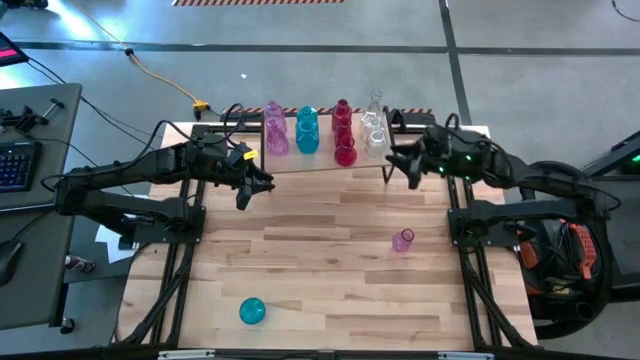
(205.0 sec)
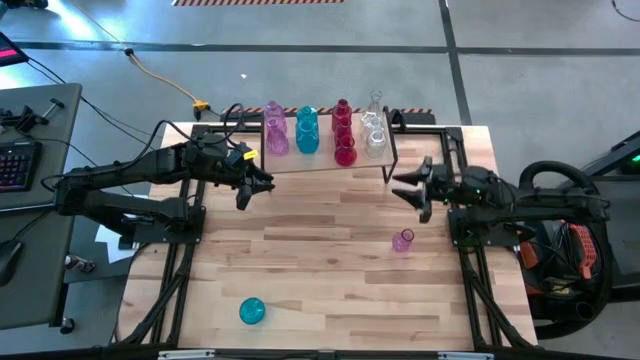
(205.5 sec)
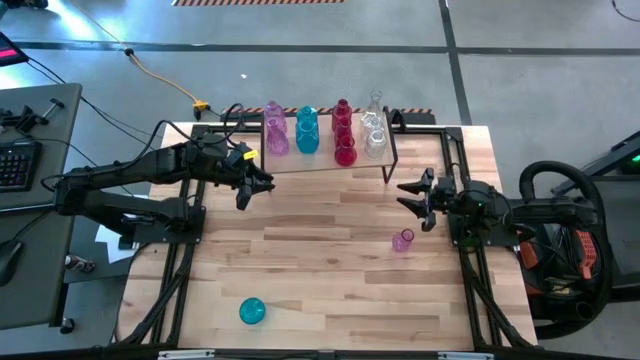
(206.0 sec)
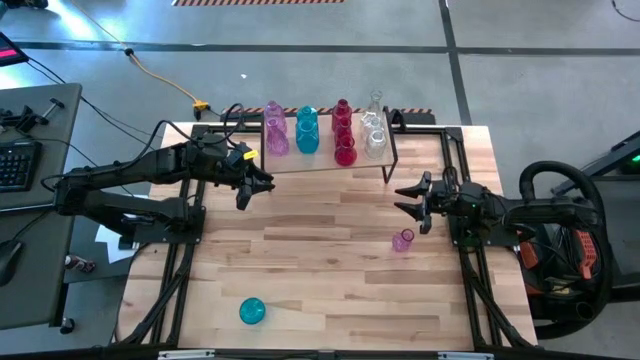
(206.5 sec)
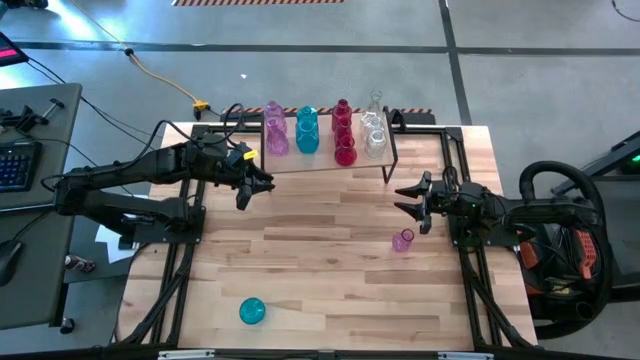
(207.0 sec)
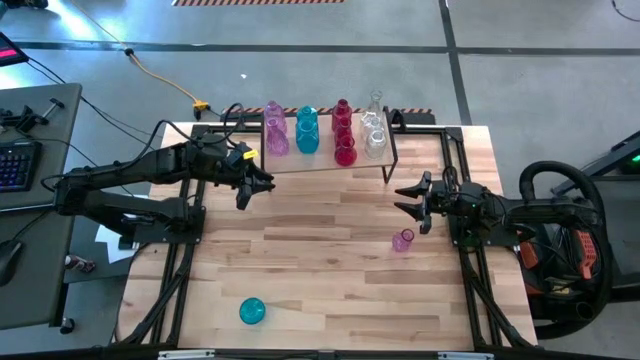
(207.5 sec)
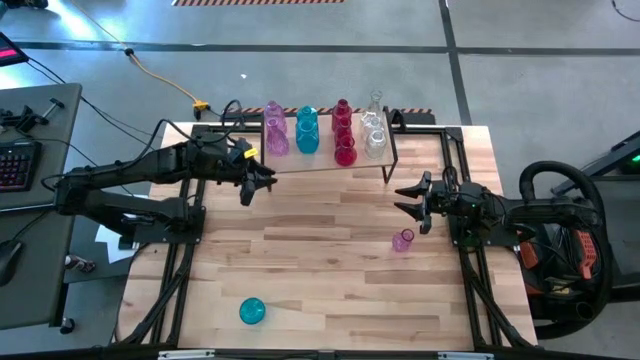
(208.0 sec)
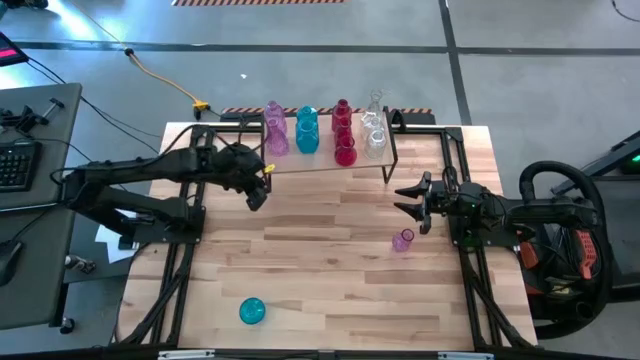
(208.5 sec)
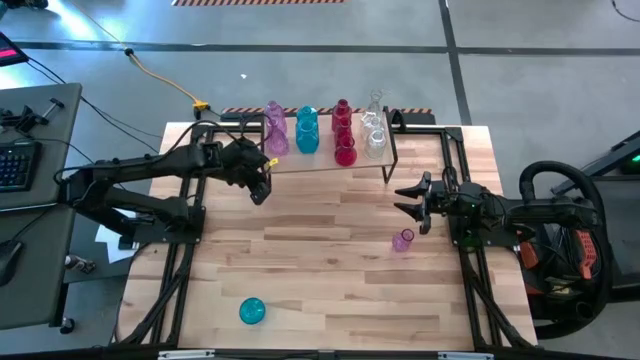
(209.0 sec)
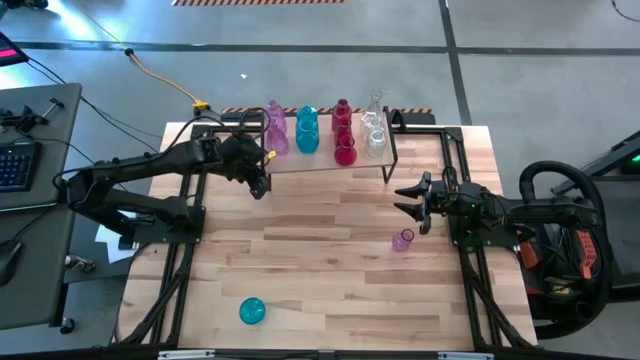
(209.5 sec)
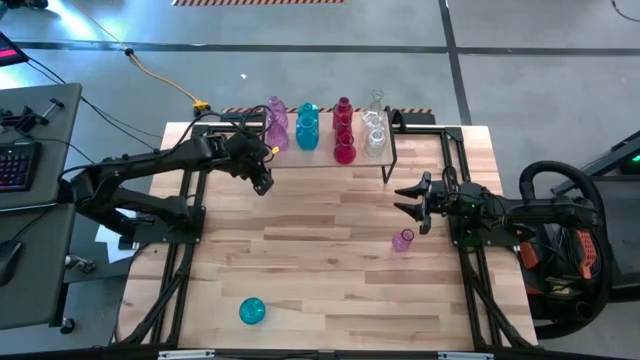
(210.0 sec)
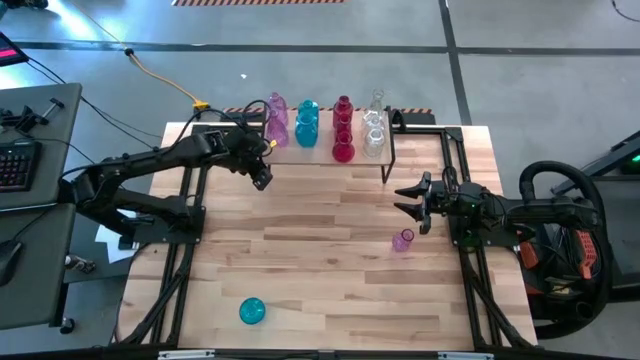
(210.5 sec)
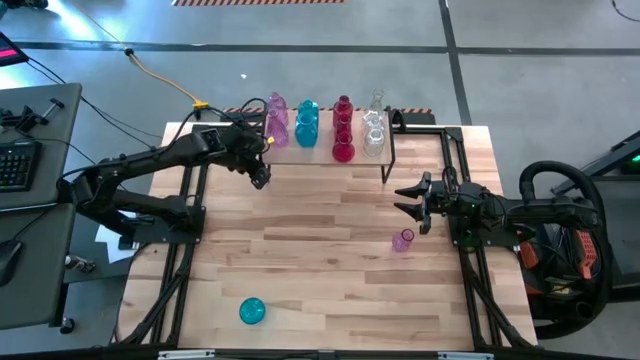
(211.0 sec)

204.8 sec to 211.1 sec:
Task: sort vases onto shelf
Adjust the shelf

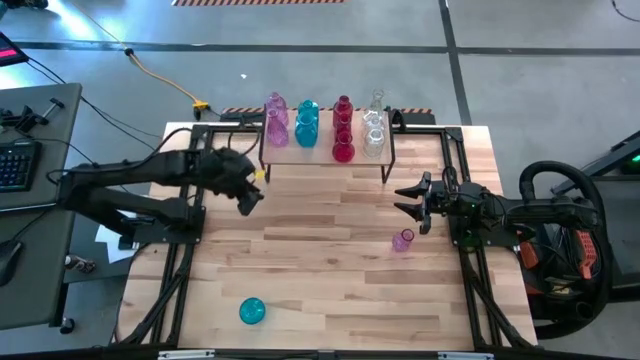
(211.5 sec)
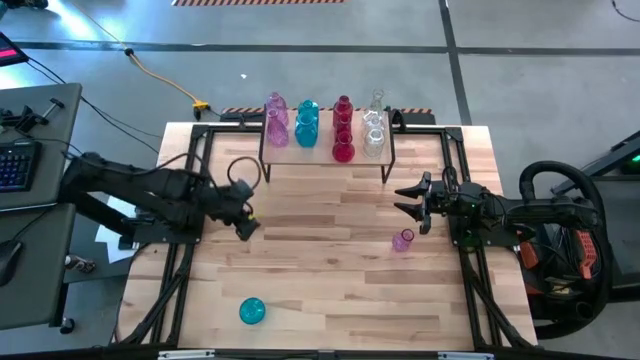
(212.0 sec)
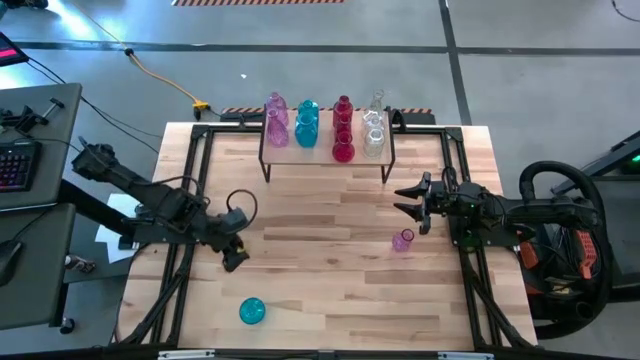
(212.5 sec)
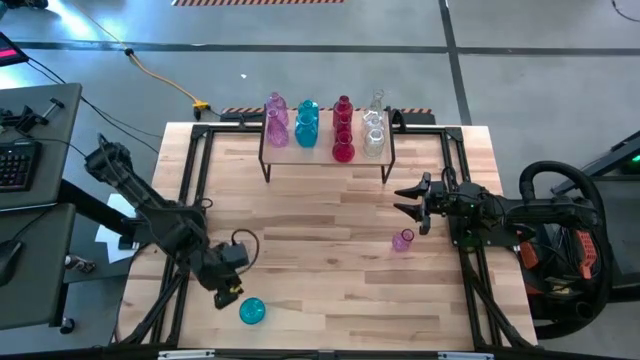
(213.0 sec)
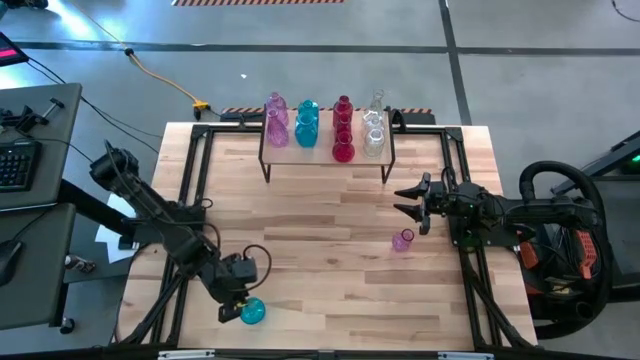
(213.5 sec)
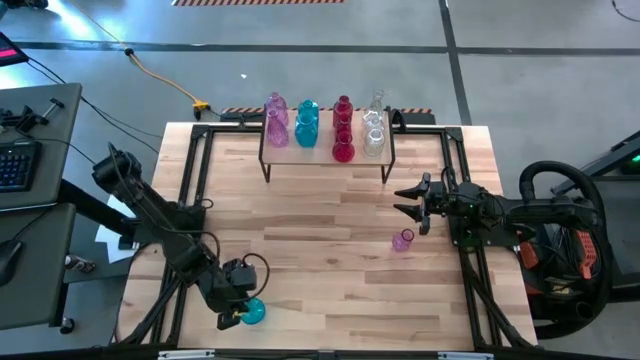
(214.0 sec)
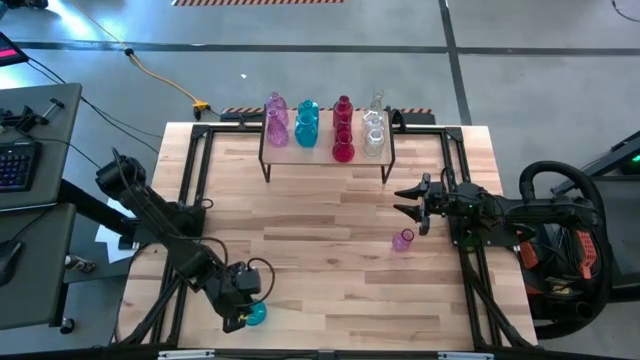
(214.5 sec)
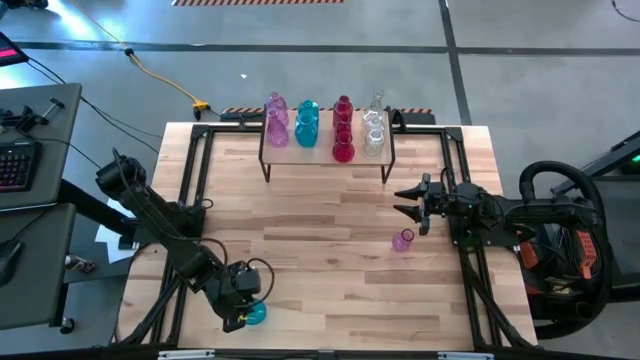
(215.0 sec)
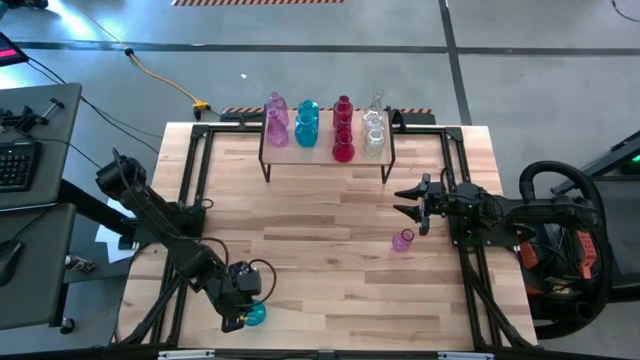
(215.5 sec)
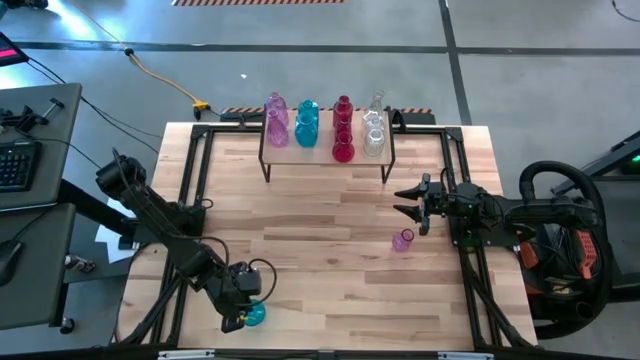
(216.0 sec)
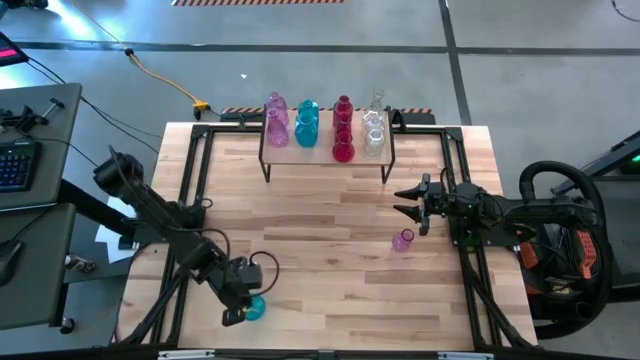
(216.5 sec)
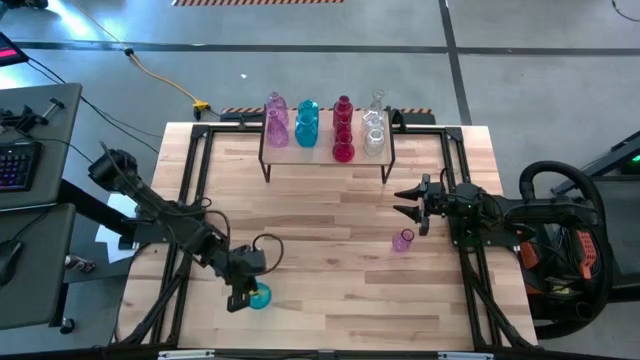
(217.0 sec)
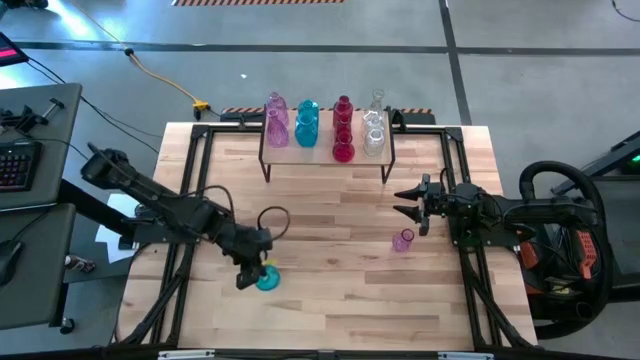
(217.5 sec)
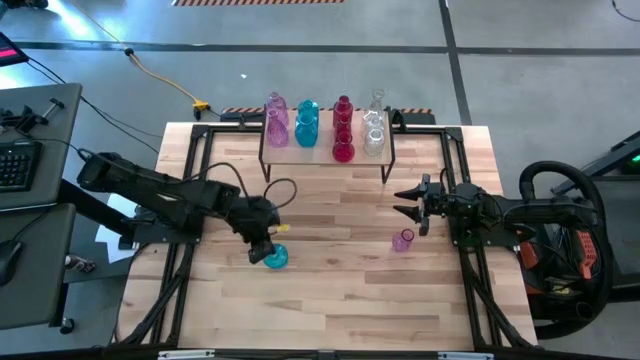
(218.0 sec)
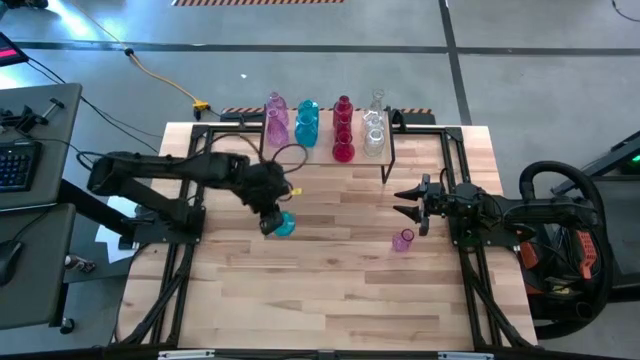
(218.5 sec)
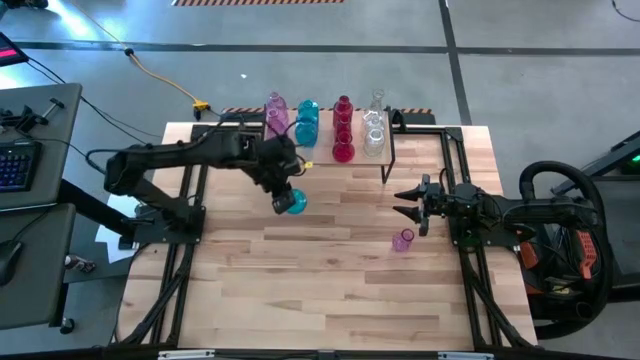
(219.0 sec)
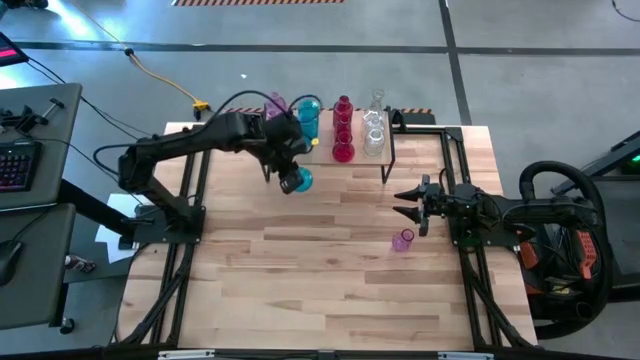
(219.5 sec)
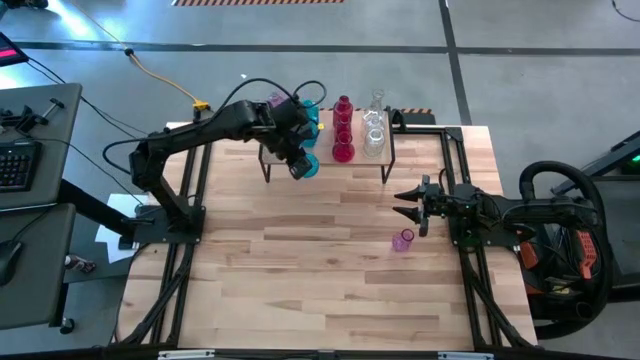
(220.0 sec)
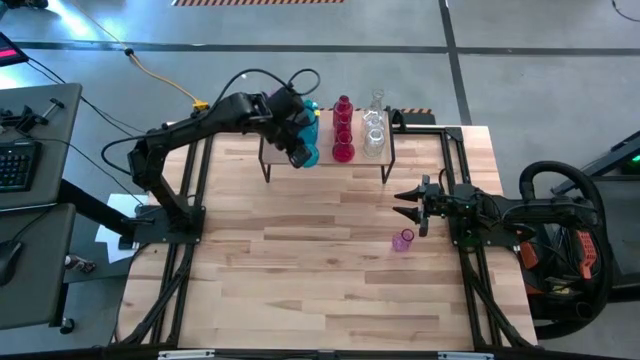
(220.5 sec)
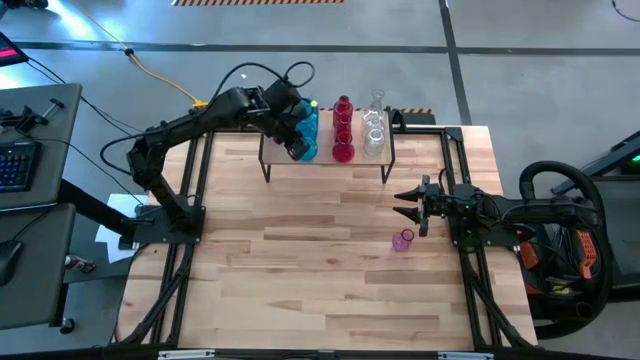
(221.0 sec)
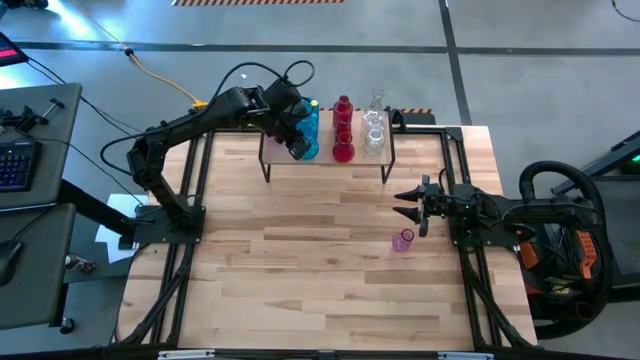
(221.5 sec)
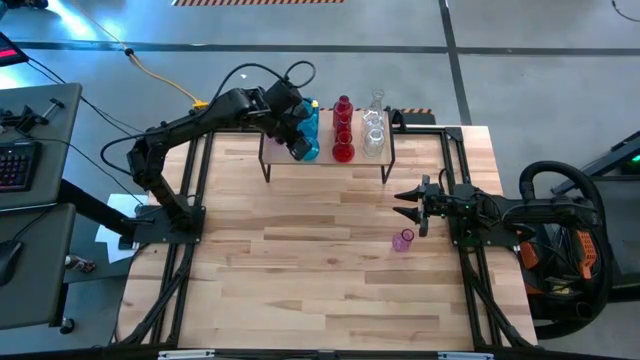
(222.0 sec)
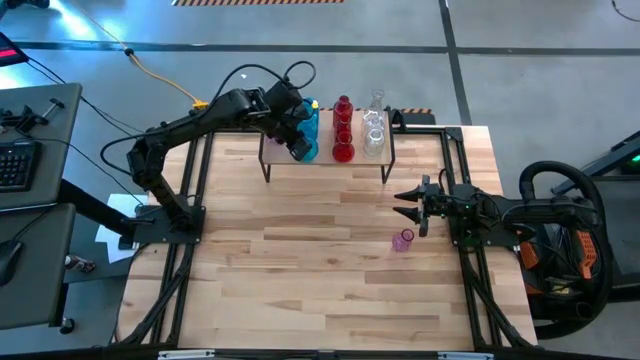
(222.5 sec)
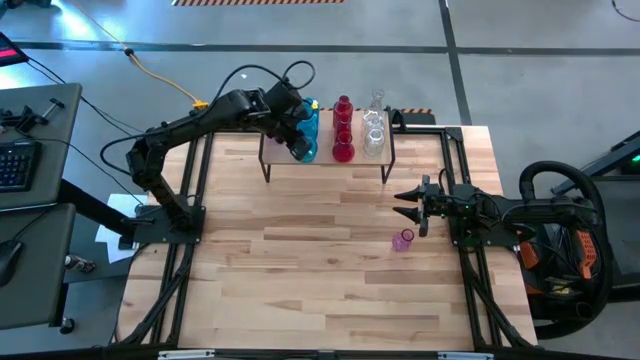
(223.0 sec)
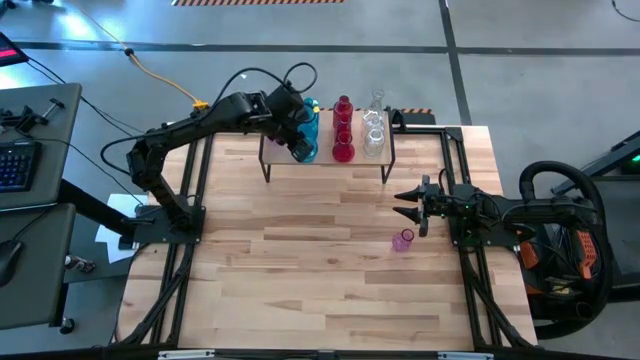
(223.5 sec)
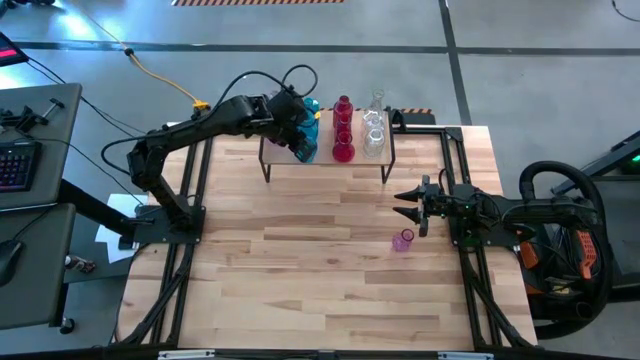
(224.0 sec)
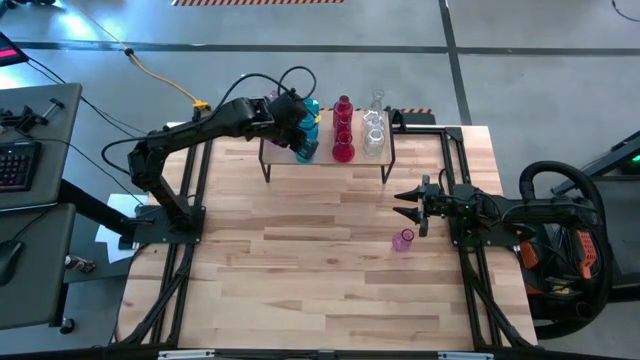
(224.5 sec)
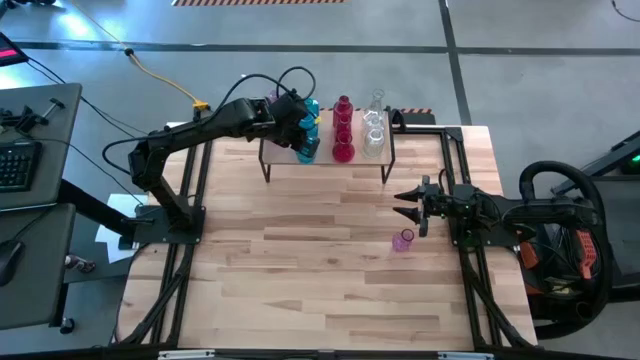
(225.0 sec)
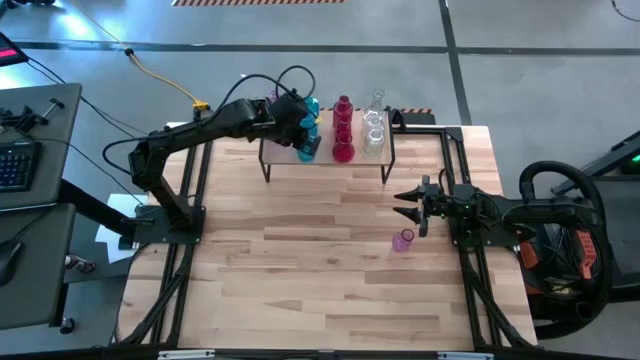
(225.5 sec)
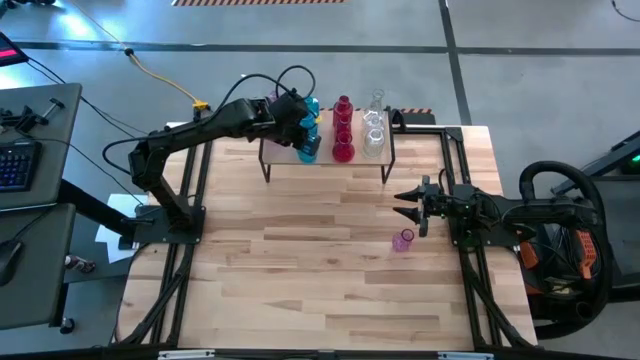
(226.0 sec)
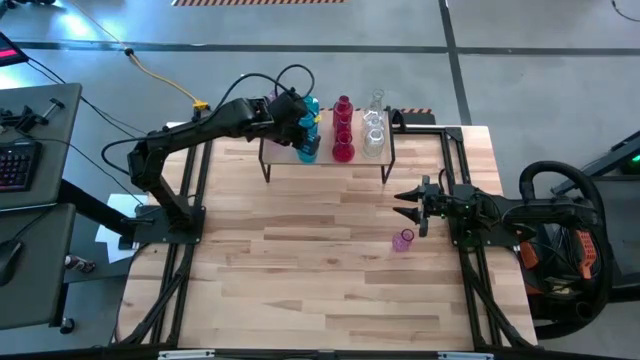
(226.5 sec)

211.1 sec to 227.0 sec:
Put the blue vase on the shelf aligned with the other blue vases
